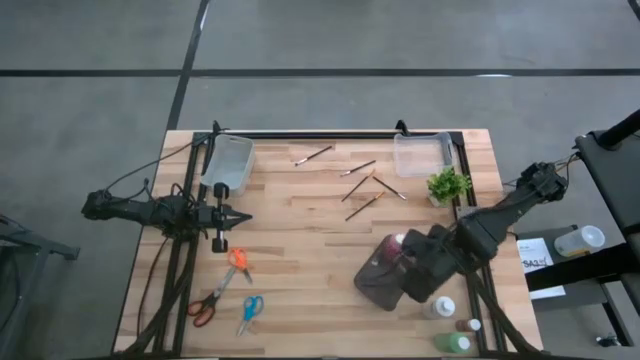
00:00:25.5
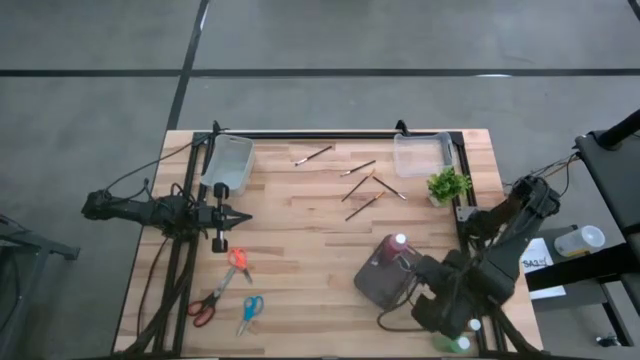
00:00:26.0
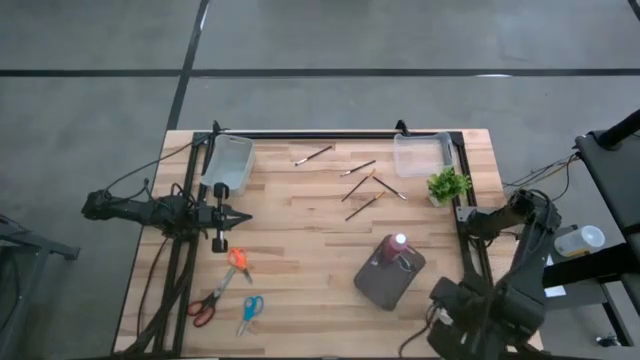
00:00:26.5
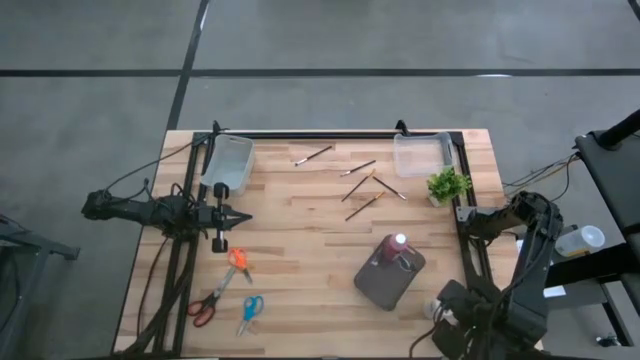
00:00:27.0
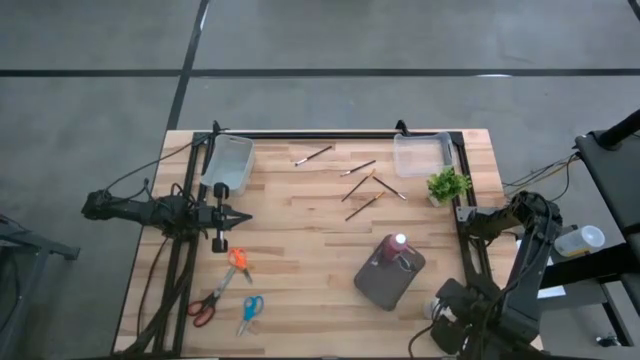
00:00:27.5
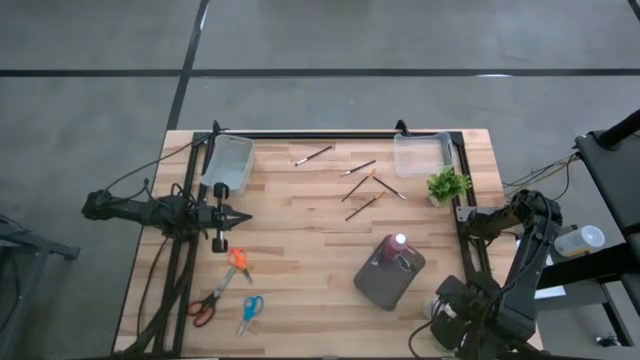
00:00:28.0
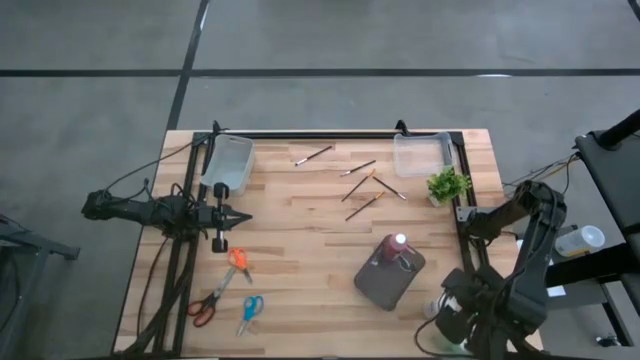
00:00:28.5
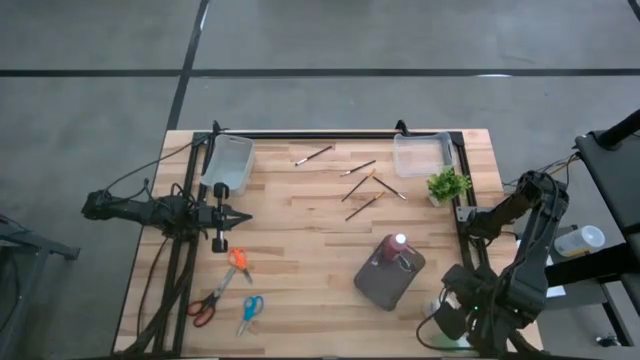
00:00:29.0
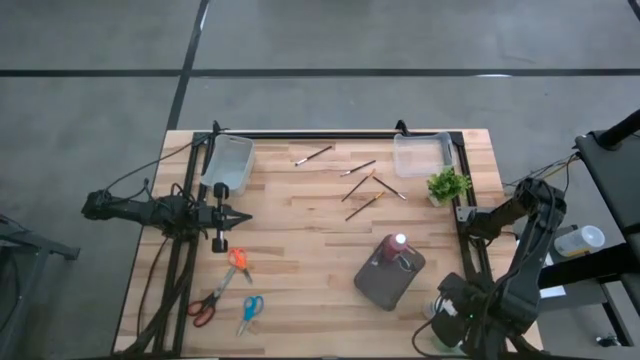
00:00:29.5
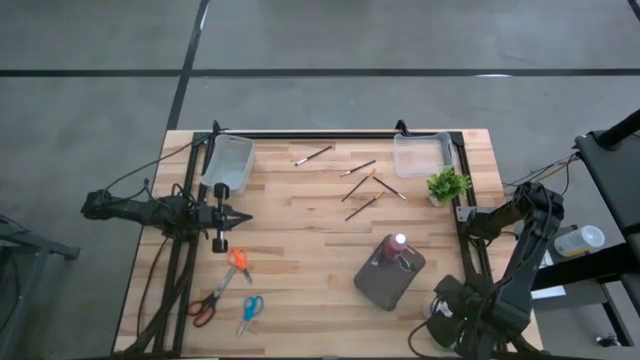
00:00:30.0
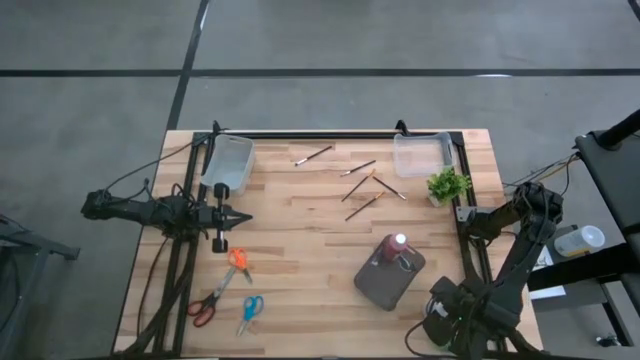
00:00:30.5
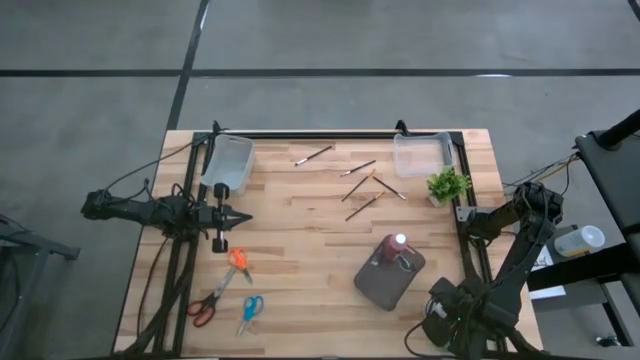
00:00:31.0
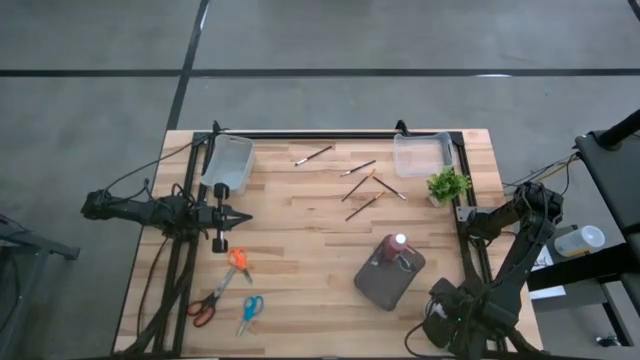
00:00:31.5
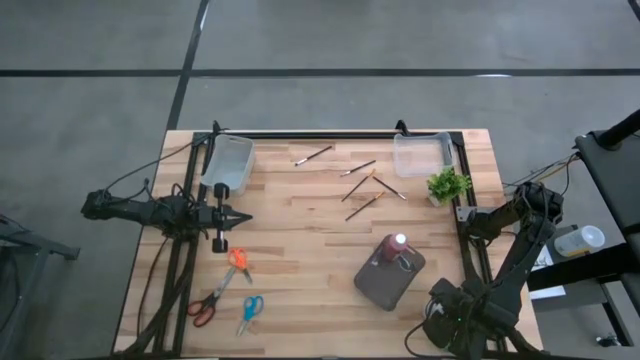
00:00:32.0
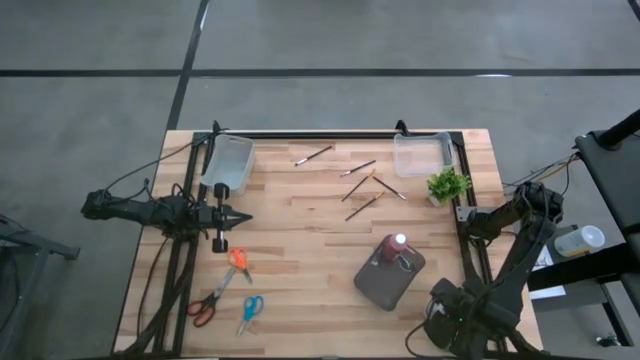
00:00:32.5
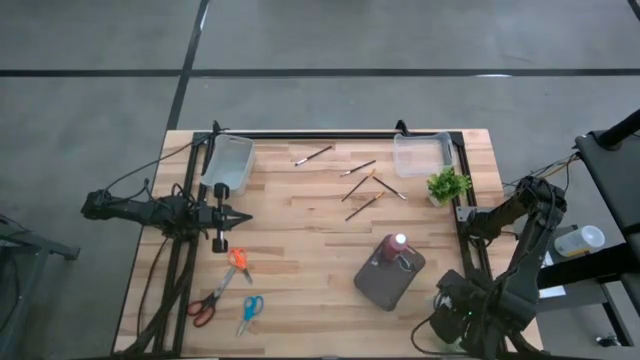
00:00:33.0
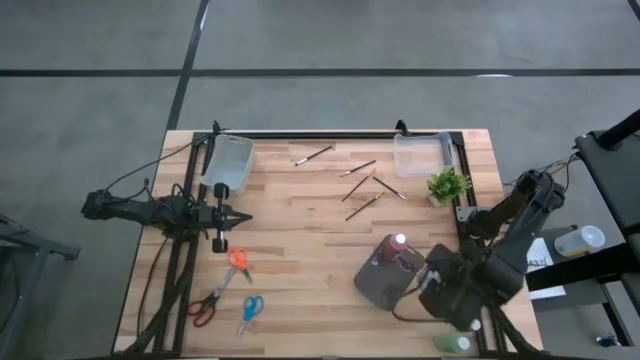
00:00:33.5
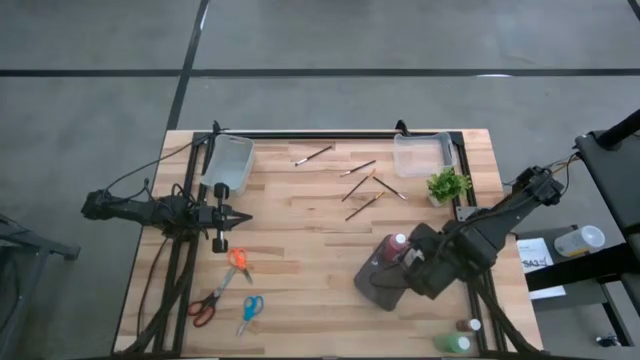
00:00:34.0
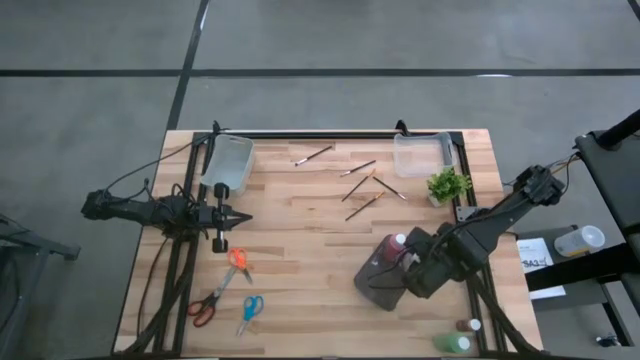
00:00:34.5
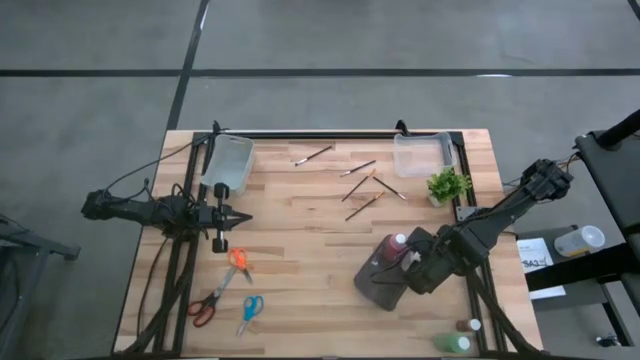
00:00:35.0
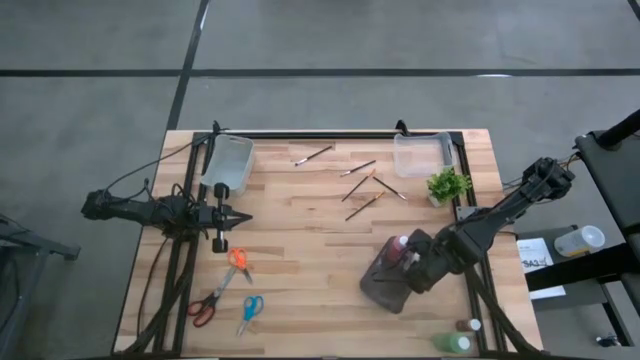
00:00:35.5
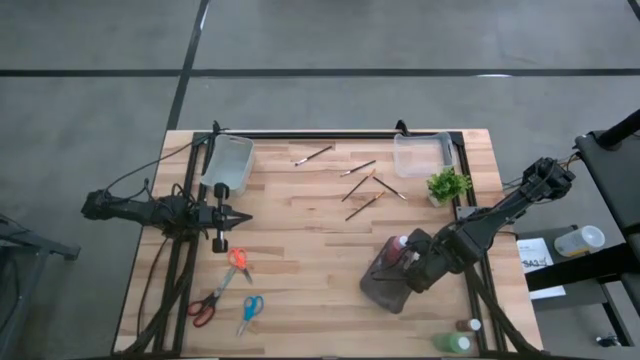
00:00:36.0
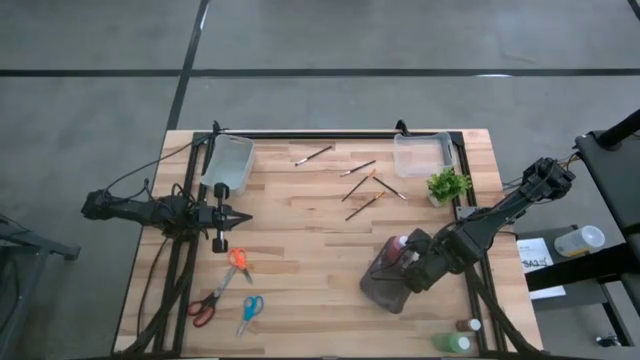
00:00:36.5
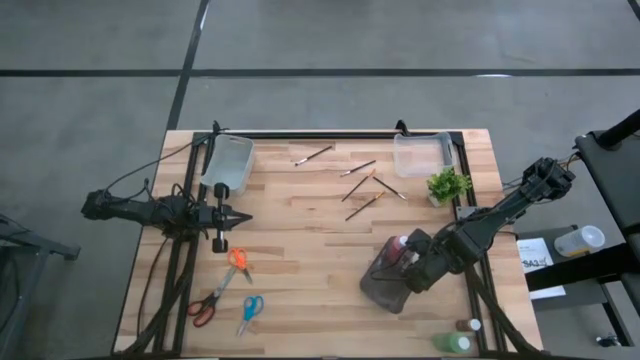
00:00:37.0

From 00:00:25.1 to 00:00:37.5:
Task: Pick & Place Paint Supplies
Put the white paint bottle into the black bin

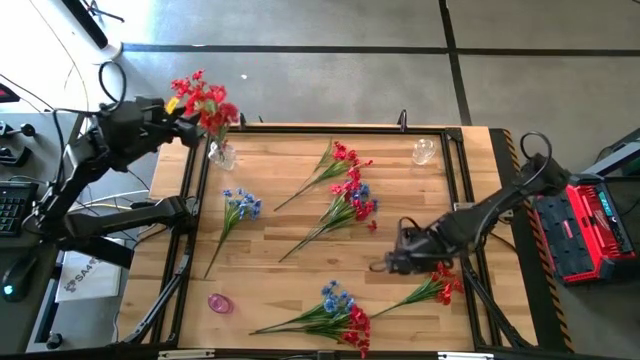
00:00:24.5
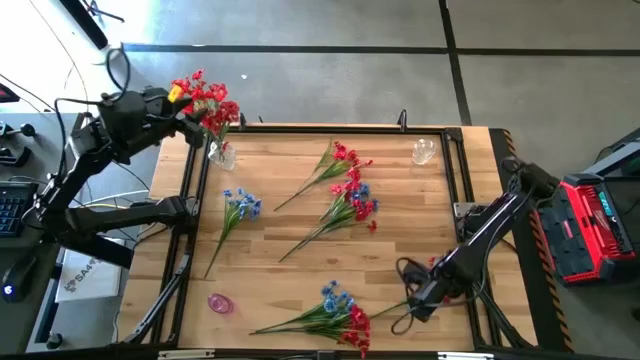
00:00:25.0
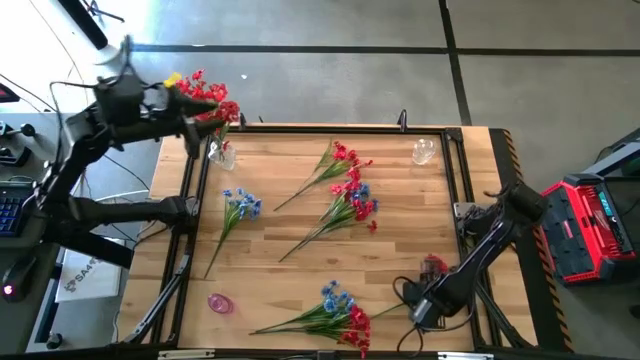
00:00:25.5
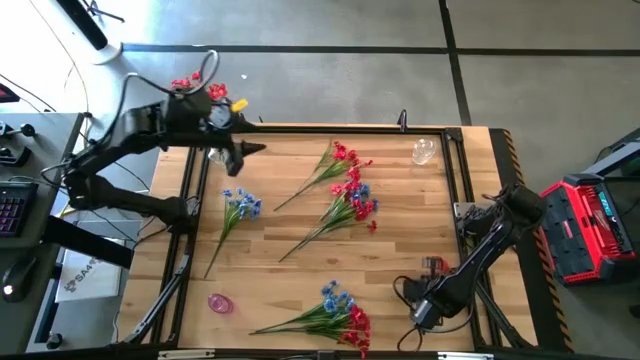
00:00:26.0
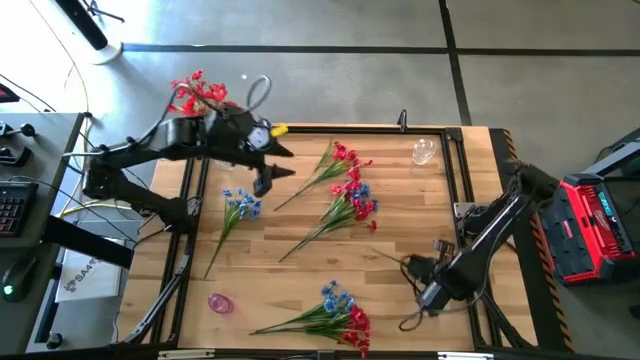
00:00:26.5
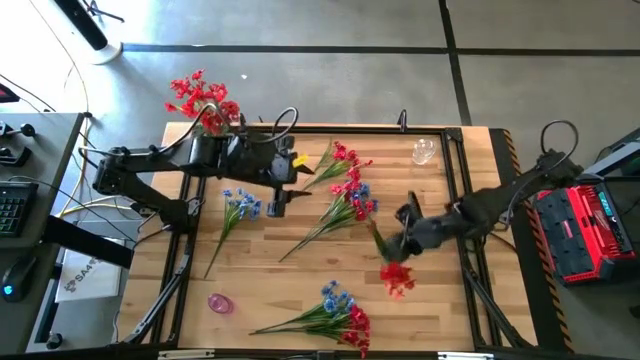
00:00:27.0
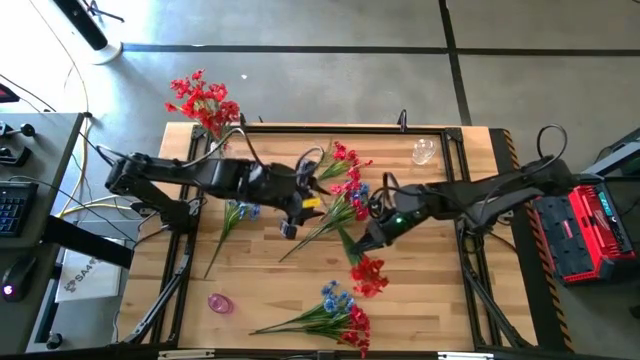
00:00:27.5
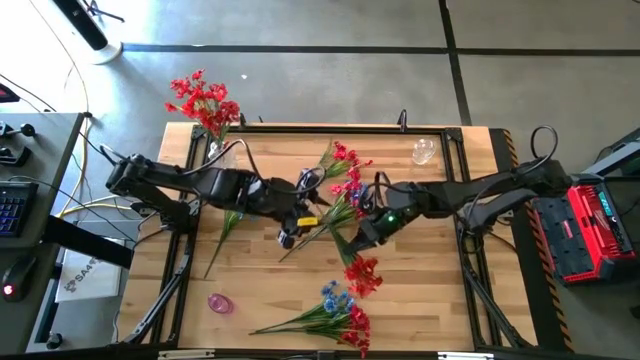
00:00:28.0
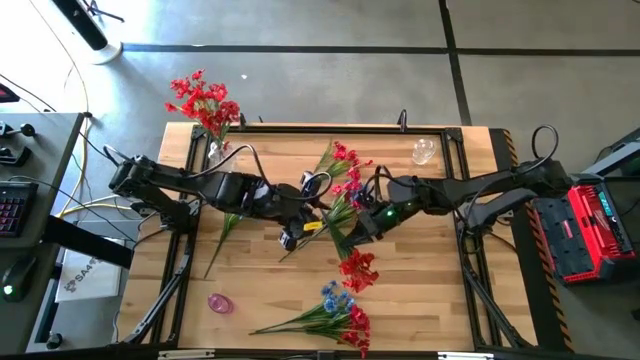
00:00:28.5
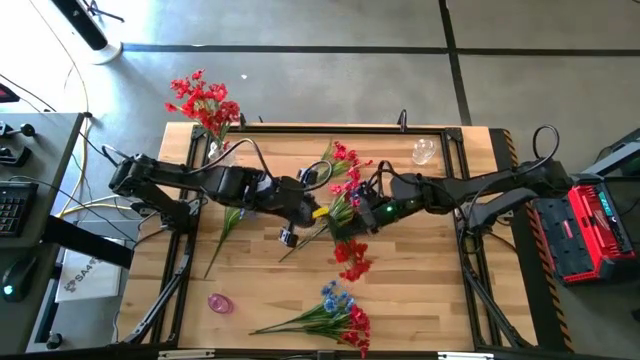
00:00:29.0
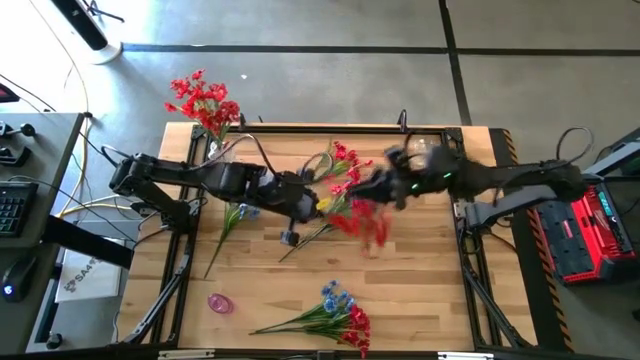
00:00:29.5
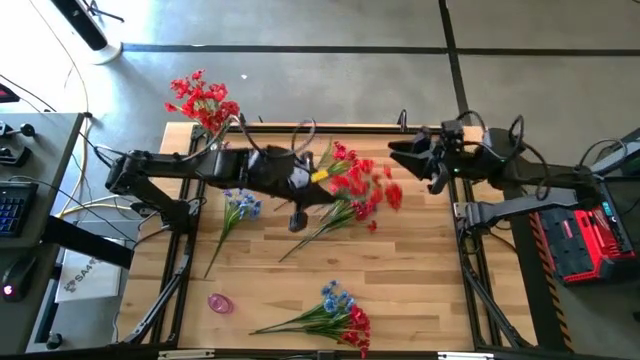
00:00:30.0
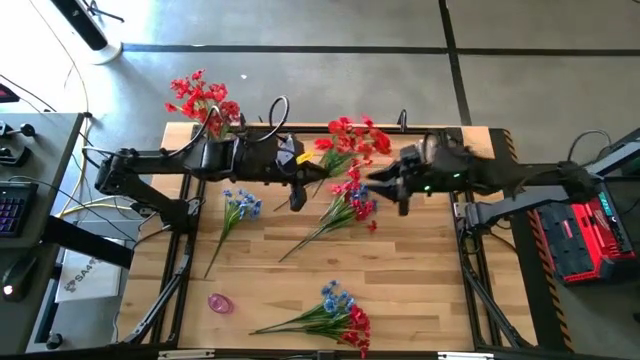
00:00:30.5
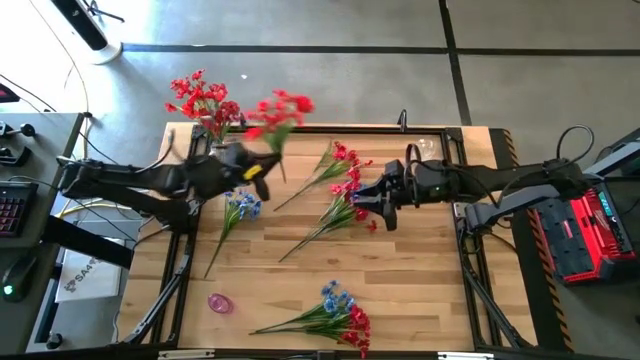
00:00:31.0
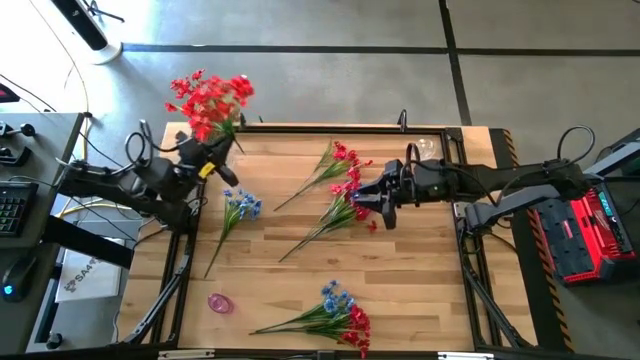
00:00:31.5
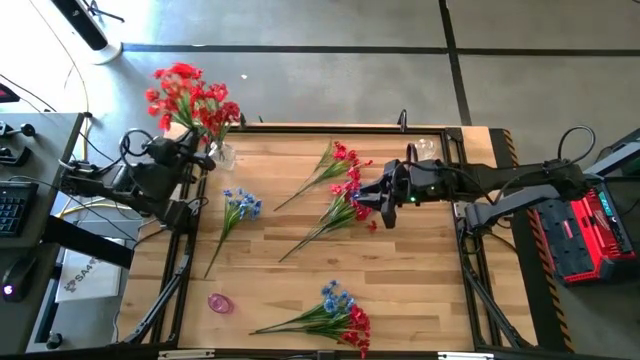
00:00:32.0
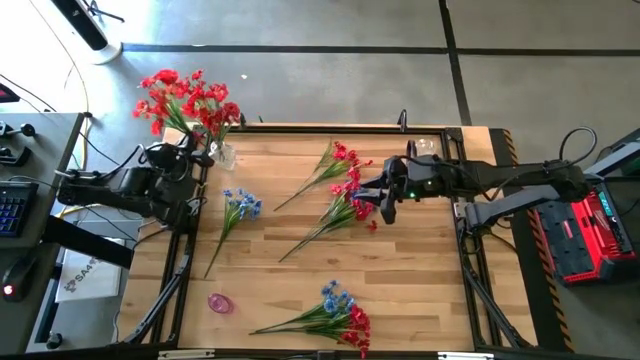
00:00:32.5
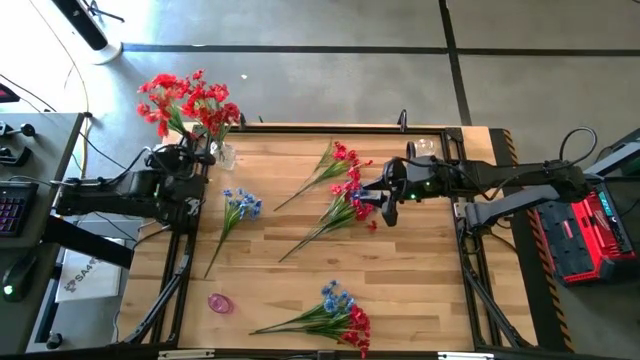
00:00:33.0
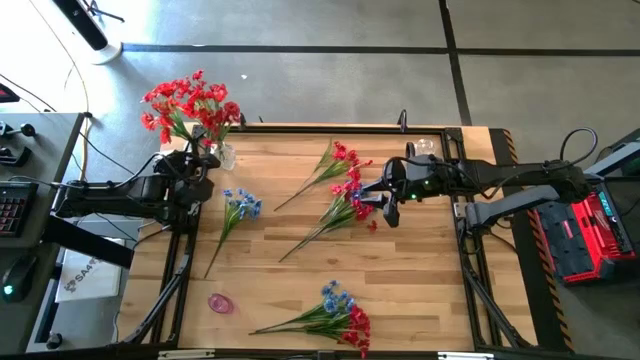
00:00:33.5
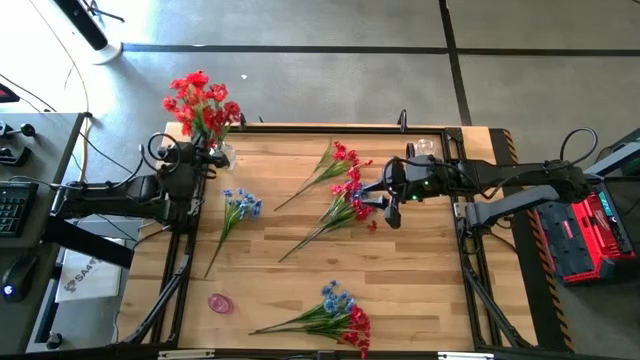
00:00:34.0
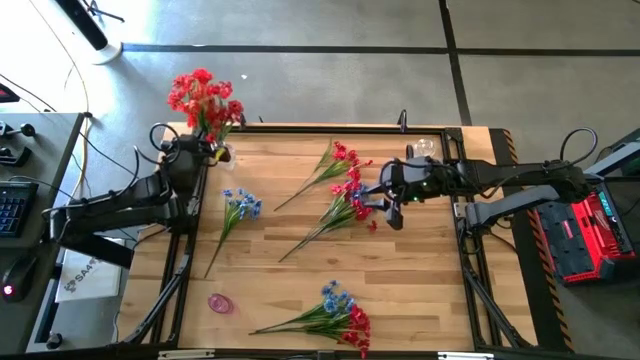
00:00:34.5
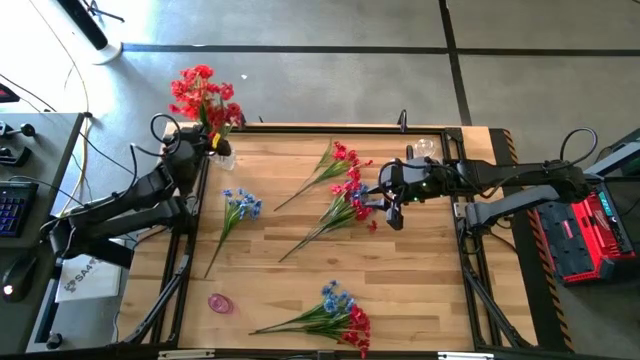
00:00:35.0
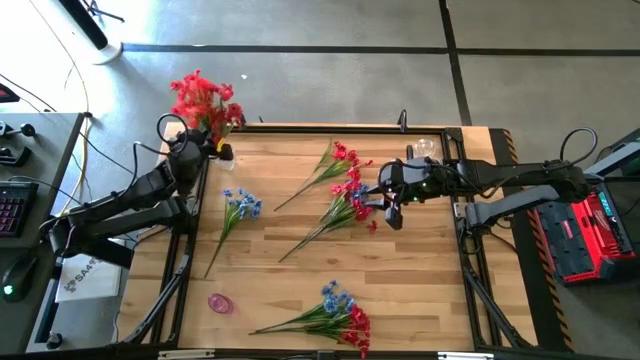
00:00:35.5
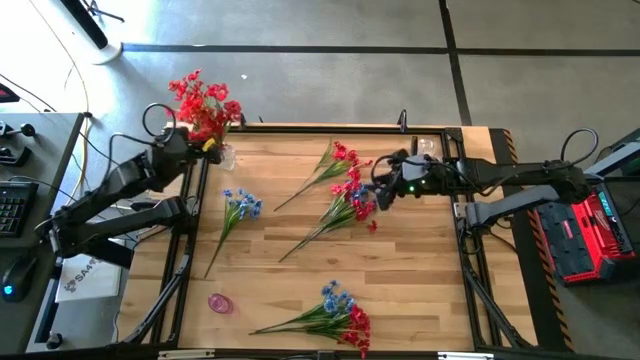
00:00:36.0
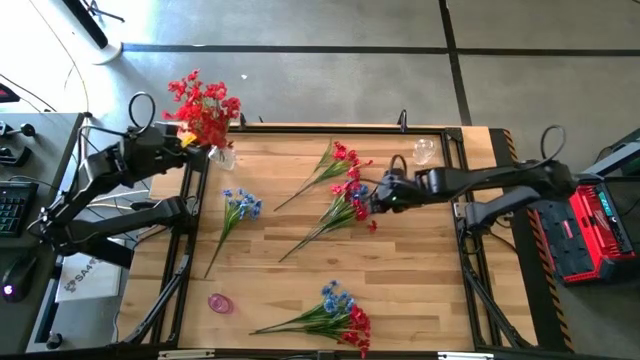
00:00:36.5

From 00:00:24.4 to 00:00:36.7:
Task: Sort flowers into vase by color
Put the bottom right red flower into the left transparent vase
